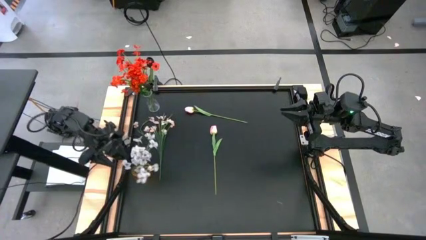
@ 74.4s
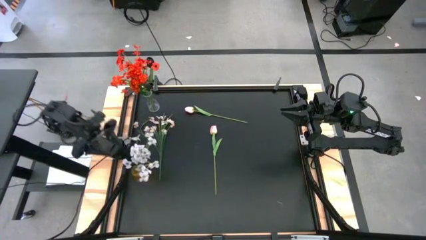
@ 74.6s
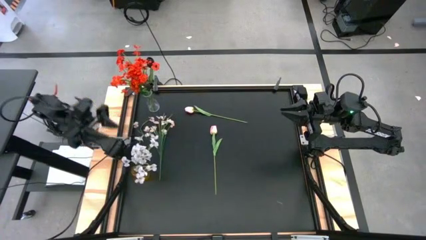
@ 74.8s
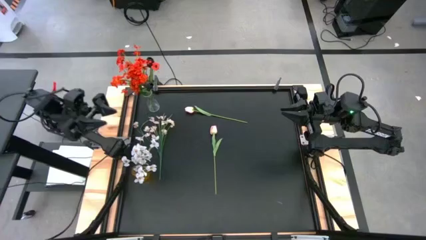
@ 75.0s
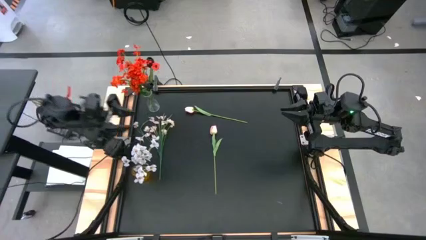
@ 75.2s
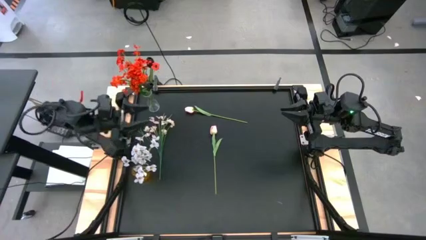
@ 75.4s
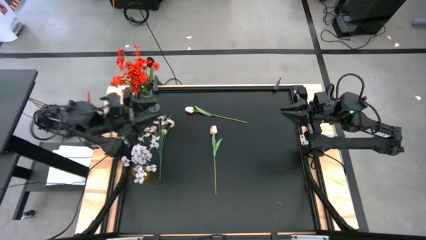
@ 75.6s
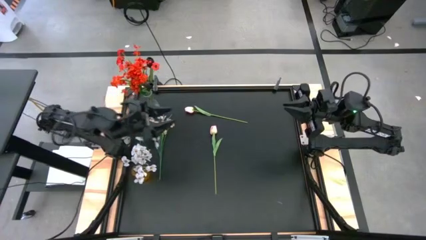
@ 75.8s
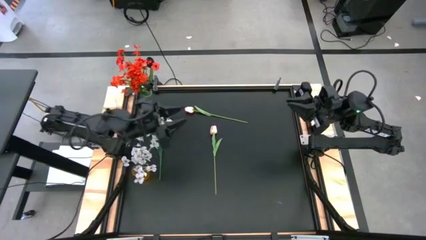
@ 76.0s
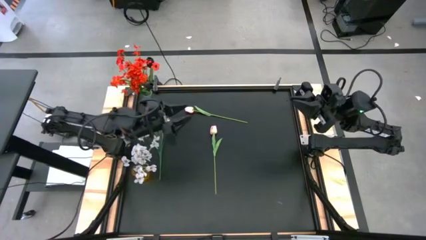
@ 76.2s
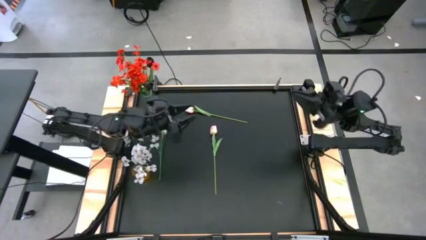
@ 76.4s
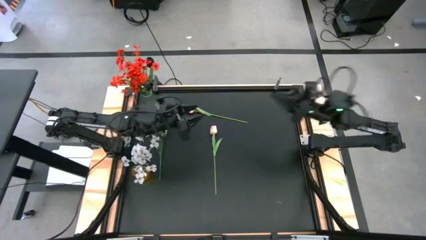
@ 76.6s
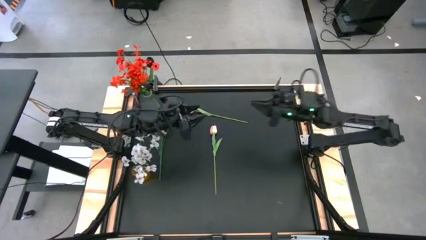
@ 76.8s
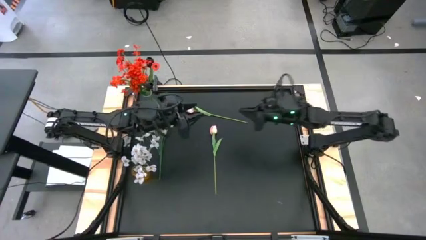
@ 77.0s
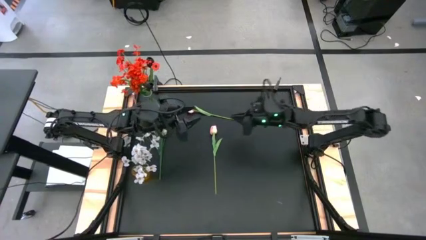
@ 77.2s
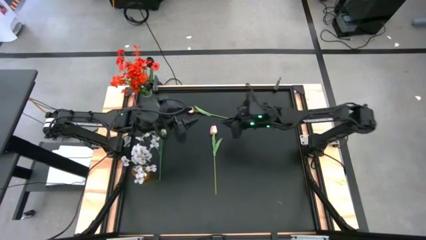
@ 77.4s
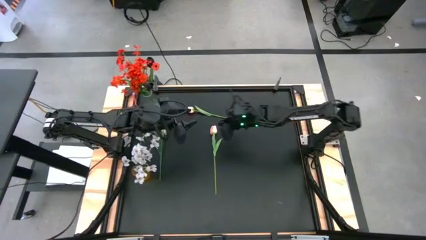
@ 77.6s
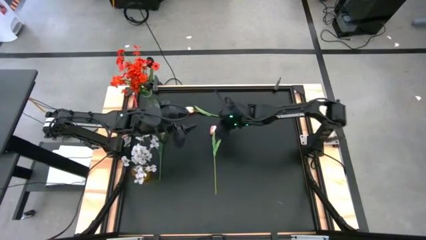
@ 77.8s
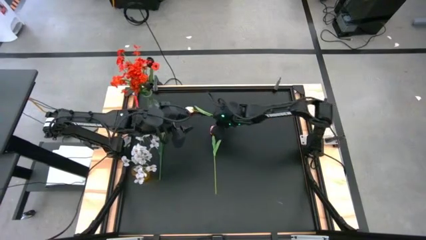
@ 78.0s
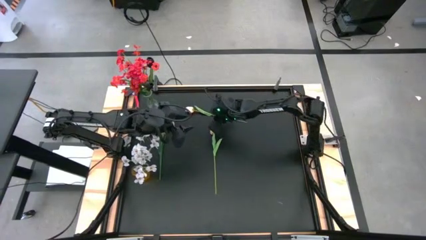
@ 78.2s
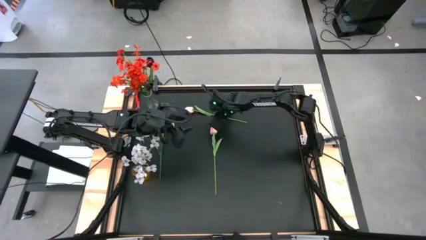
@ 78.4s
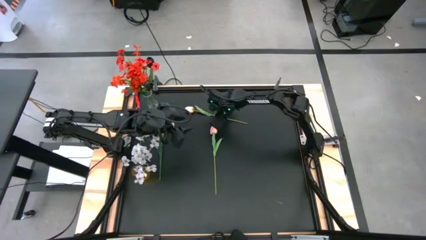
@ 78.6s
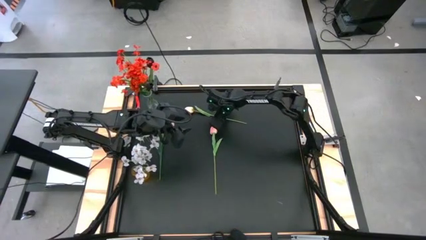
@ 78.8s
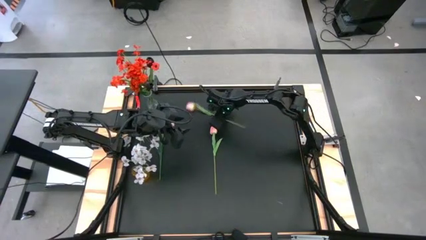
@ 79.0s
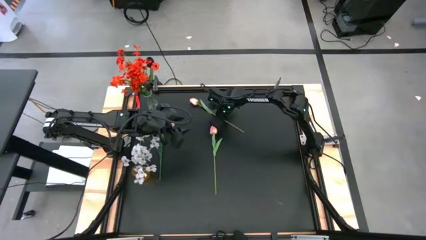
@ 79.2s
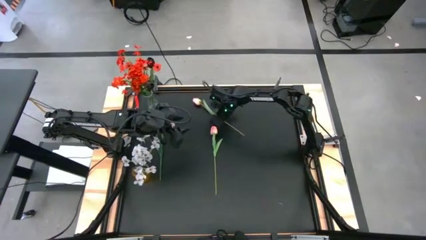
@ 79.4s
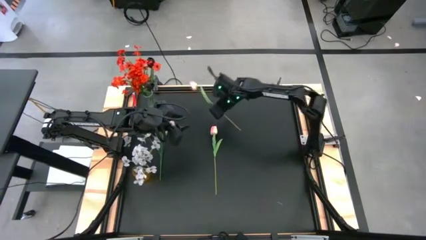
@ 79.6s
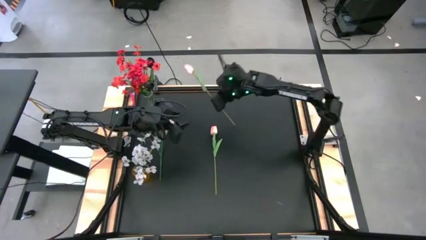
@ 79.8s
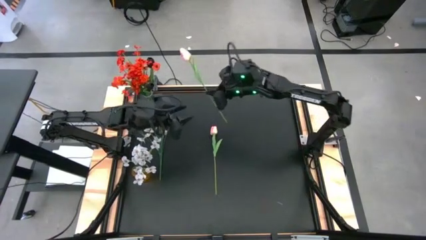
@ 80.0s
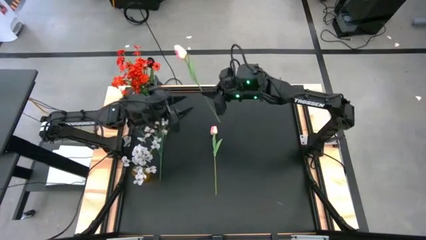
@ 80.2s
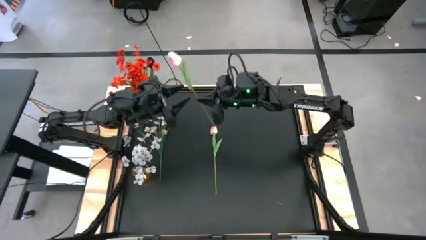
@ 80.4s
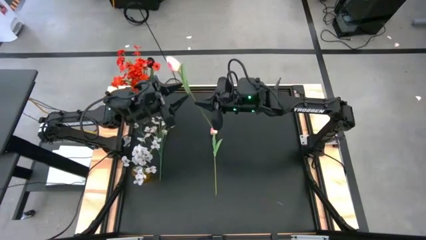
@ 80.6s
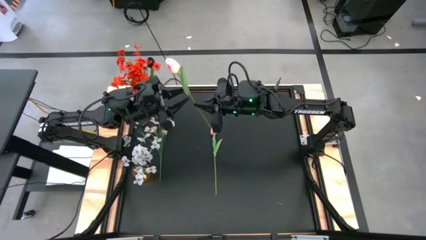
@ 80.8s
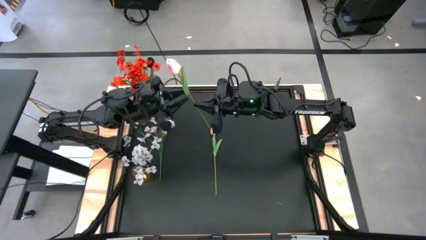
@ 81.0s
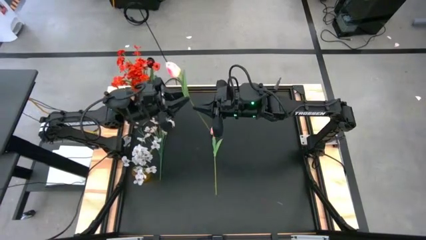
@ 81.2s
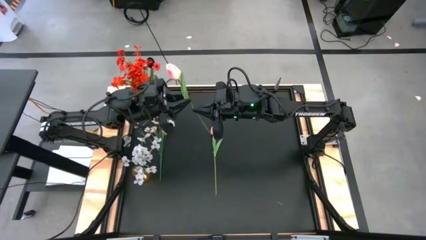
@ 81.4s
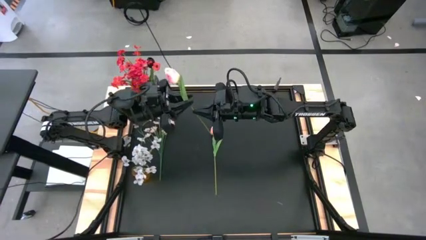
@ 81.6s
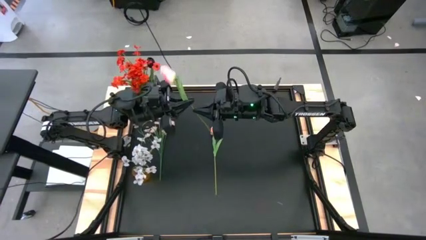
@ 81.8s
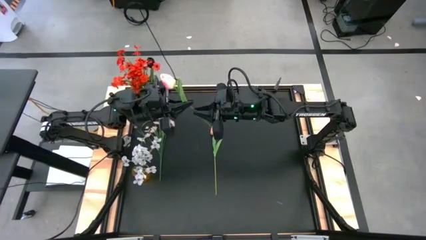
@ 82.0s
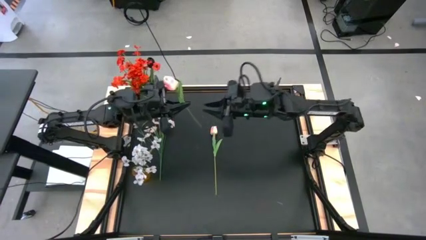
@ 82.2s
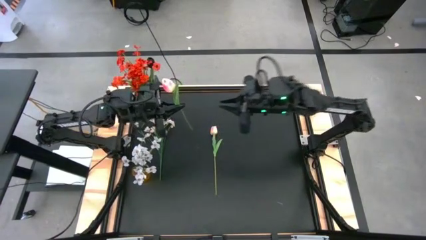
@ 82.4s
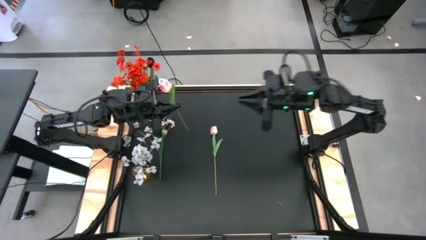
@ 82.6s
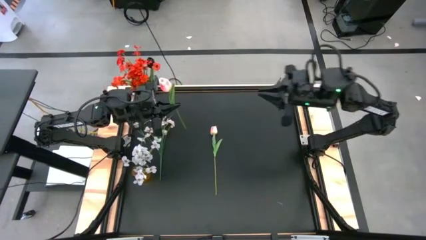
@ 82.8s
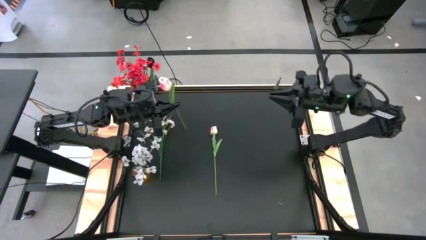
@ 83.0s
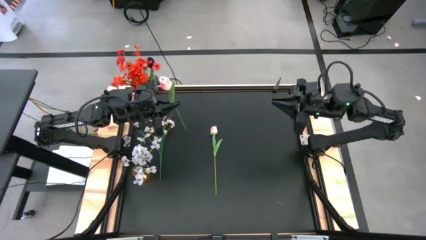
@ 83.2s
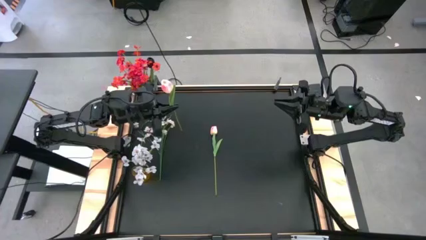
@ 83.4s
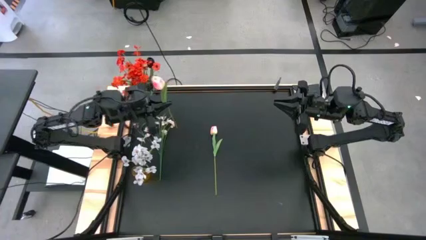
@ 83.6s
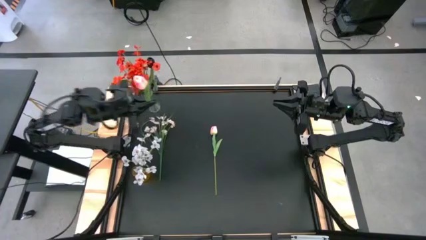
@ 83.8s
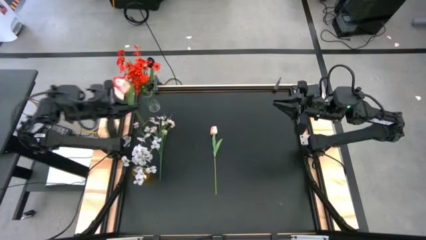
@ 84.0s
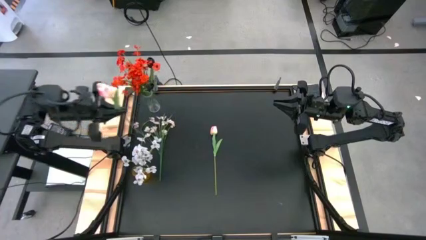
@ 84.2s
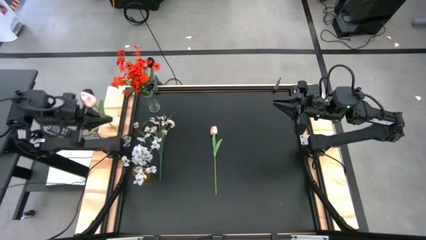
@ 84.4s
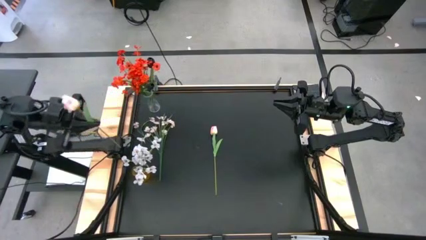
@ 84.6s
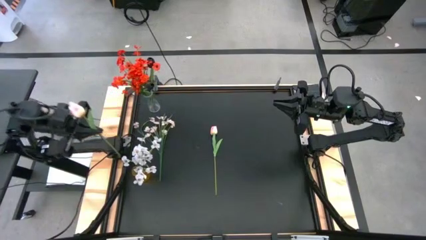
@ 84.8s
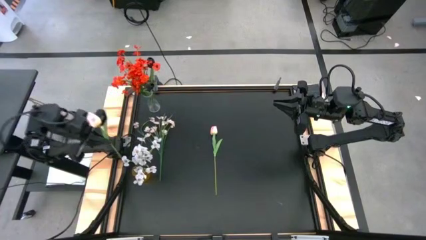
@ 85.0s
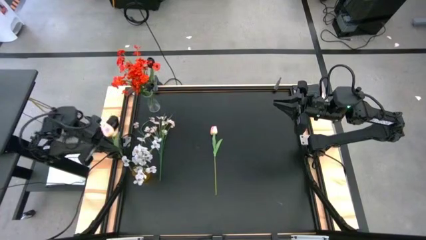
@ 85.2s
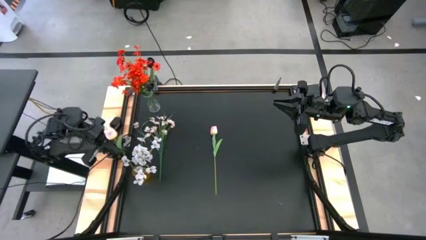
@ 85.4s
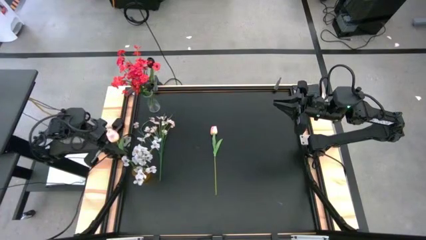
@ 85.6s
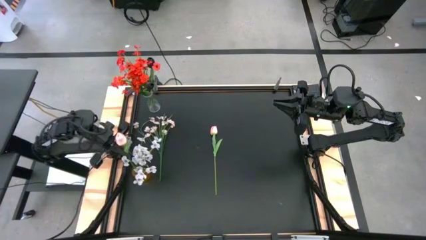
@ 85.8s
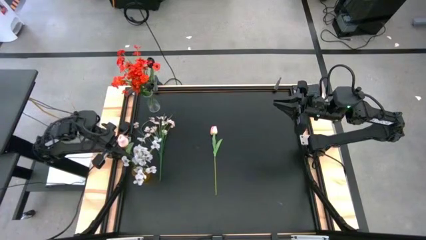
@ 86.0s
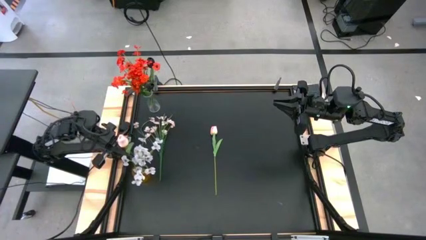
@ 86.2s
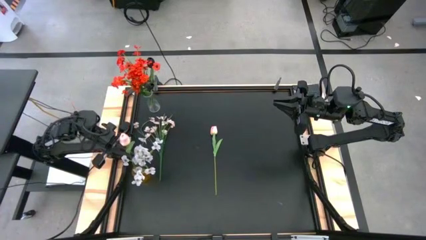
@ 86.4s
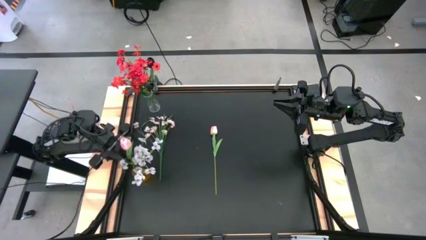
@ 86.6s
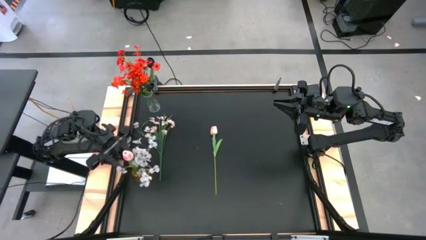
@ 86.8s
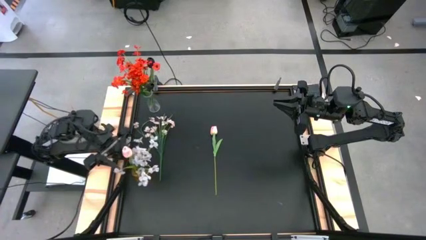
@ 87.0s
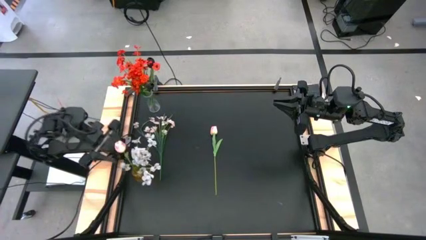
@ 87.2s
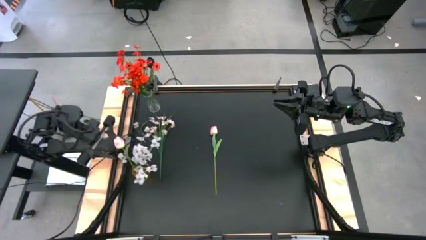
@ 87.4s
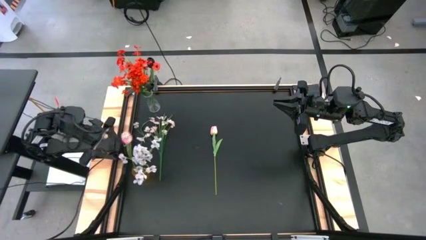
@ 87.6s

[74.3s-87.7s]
Task: Sort flowers into vase by color
Put the pink flower into the yellow vase

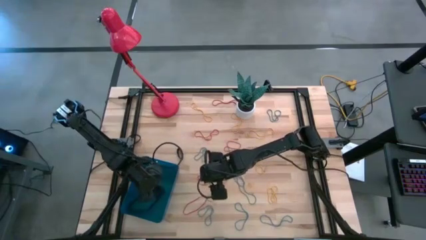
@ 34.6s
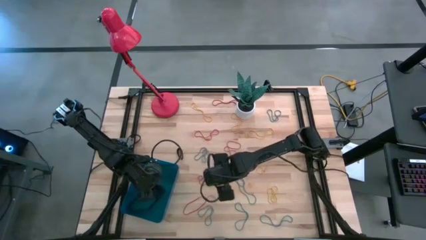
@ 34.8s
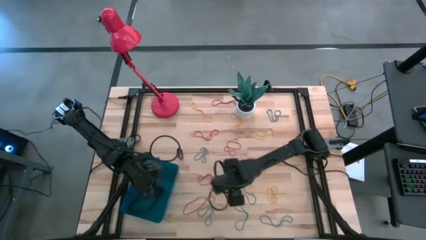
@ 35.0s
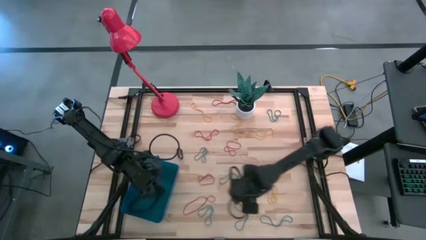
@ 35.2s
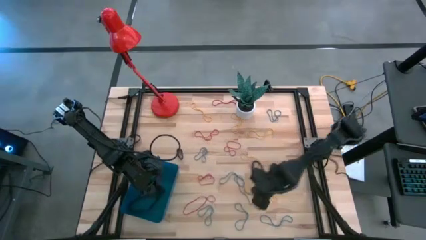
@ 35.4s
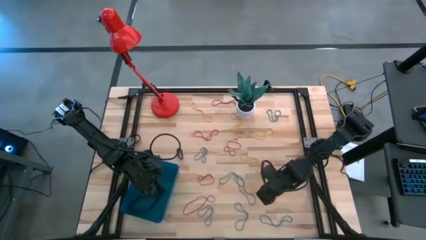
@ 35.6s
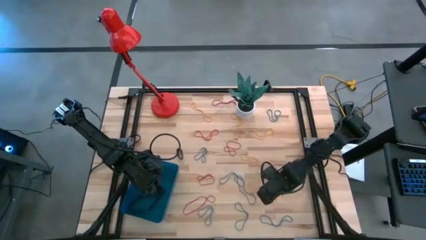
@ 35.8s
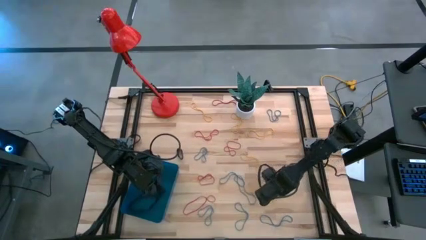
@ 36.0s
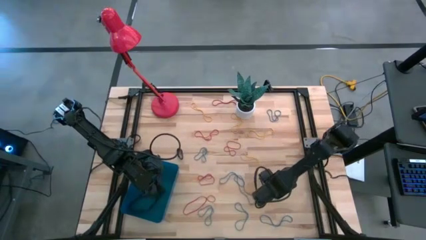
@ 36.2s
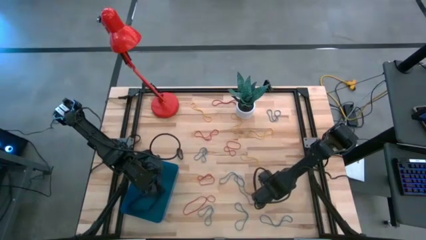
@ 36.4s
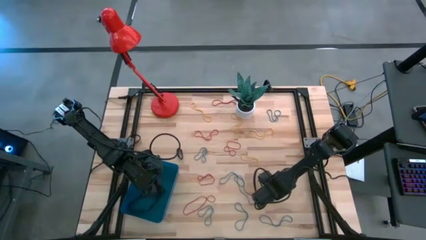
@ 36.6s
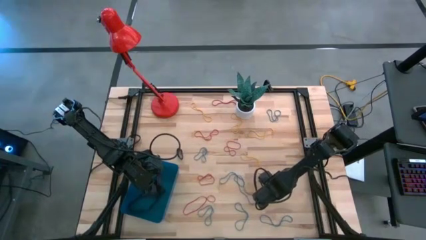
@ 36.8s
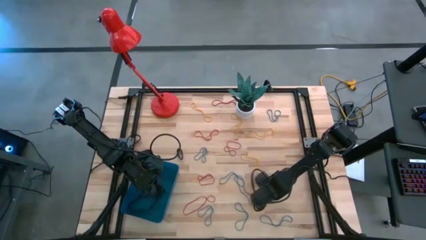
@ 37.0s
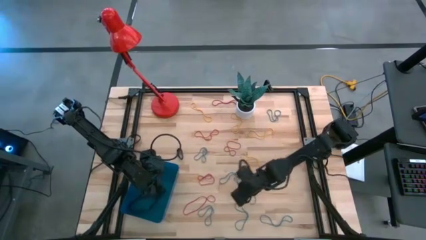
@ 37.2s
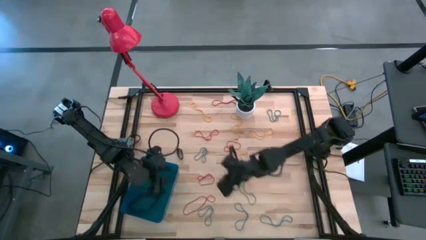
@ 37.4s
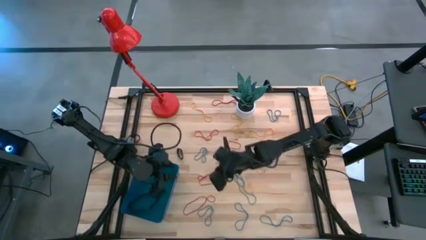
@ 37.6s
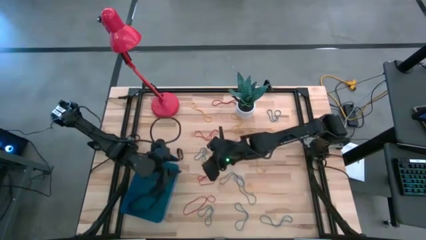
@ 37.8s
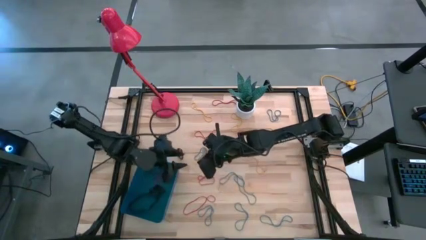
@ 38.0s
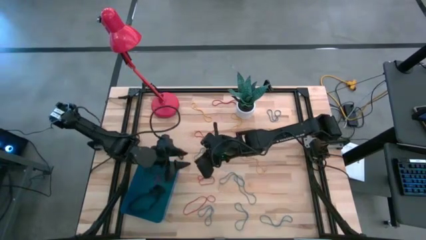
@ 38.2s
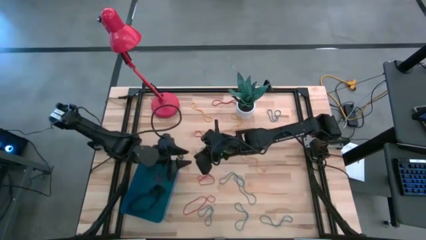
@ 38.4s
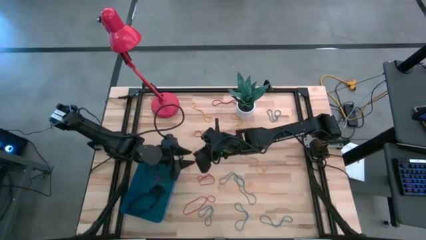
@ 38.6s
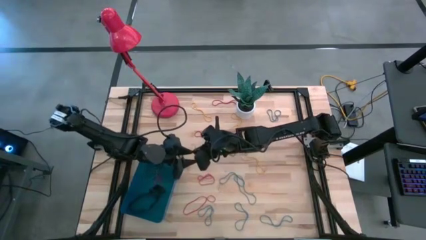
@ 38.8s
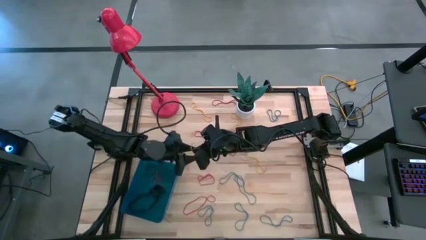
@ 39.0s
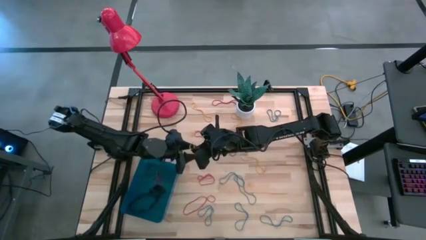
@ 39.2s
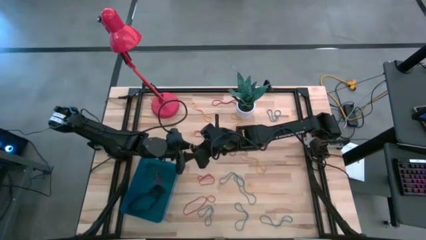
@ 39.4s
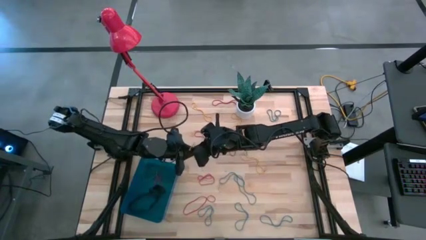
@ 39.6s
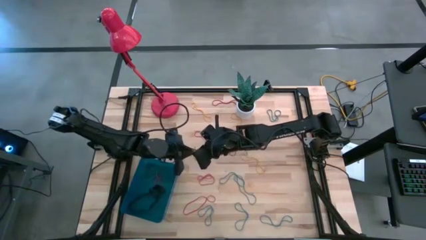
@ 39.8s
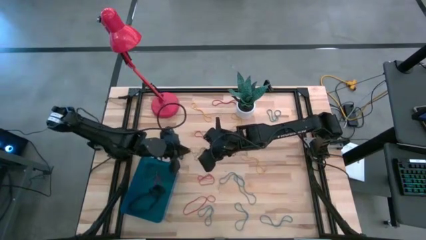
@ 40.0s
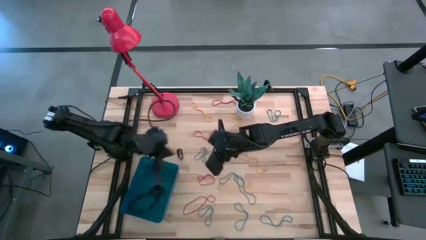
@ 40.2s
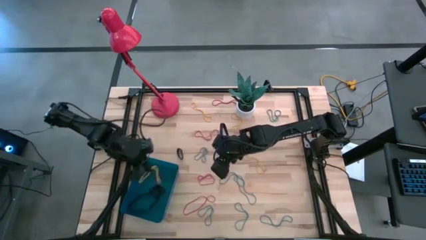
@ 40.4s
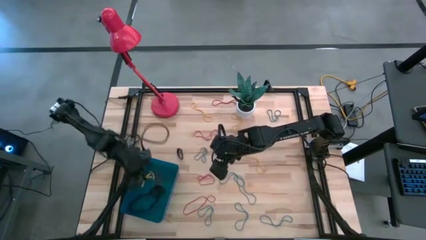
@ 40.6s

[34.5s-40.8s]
Task: Pick and place rubber bands into bin
Put the yellow rubber band into the blue bin
